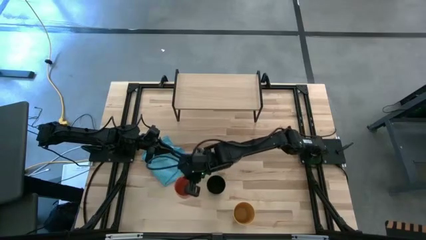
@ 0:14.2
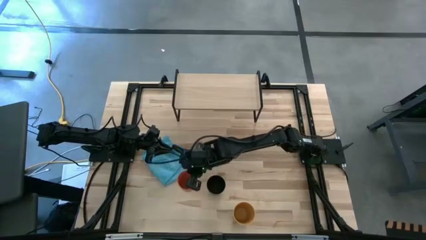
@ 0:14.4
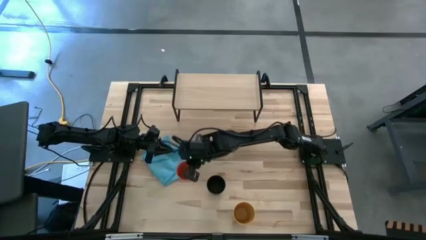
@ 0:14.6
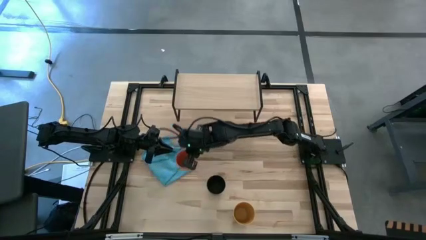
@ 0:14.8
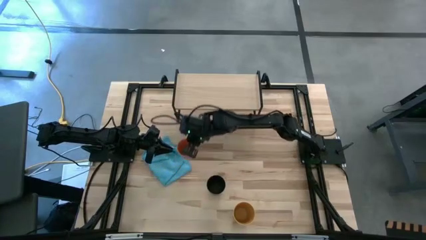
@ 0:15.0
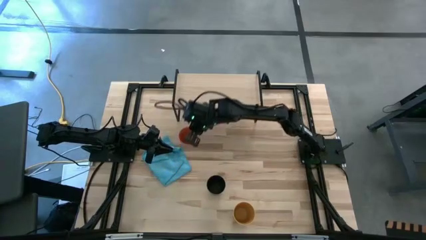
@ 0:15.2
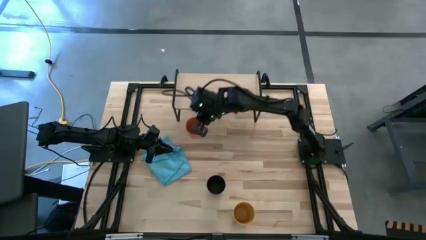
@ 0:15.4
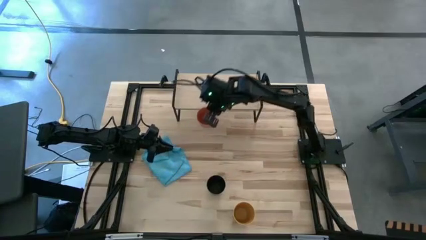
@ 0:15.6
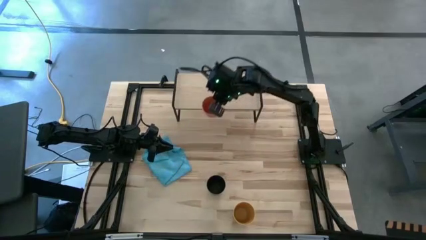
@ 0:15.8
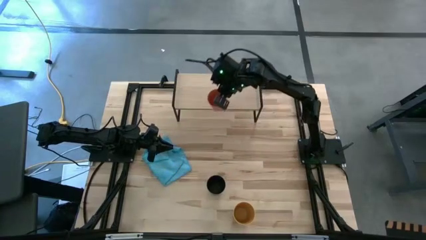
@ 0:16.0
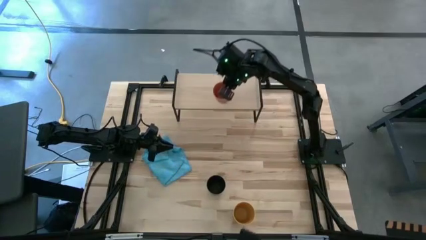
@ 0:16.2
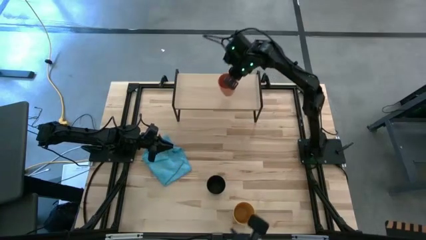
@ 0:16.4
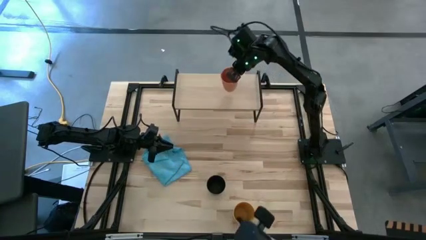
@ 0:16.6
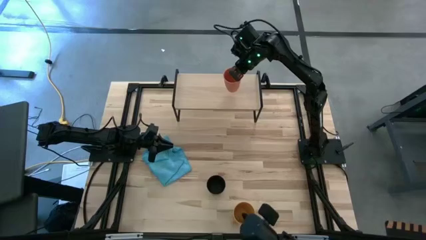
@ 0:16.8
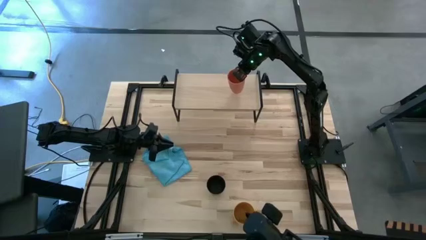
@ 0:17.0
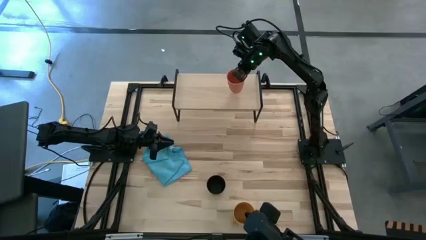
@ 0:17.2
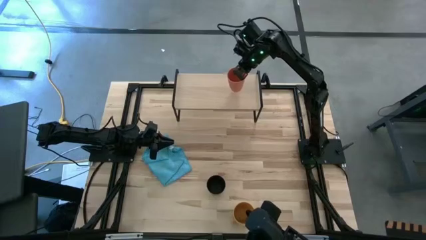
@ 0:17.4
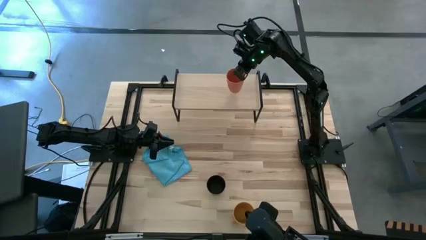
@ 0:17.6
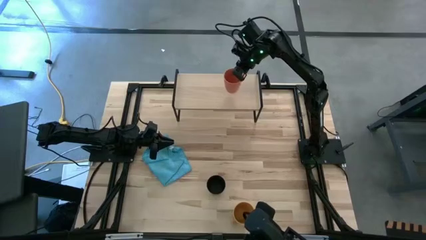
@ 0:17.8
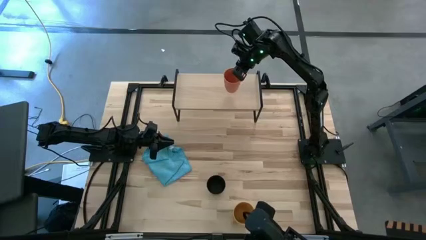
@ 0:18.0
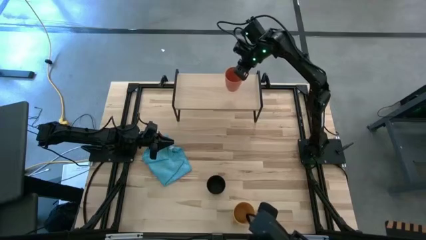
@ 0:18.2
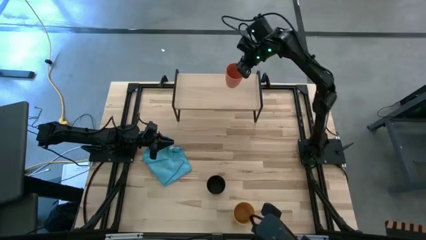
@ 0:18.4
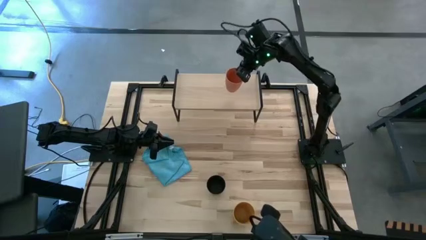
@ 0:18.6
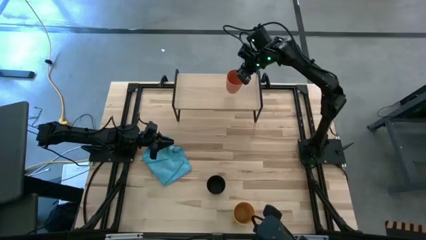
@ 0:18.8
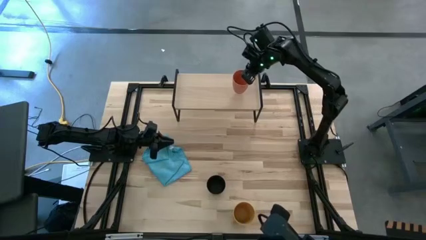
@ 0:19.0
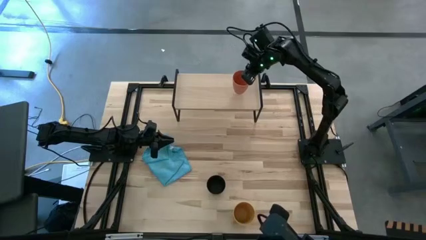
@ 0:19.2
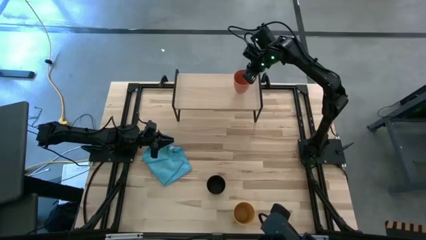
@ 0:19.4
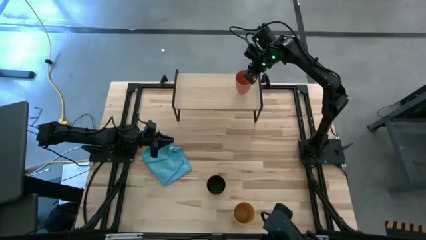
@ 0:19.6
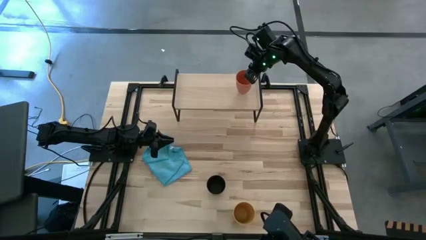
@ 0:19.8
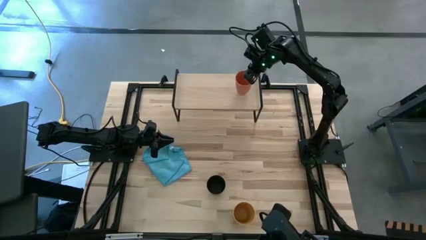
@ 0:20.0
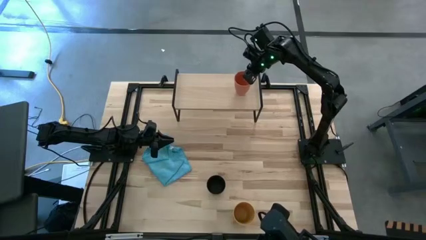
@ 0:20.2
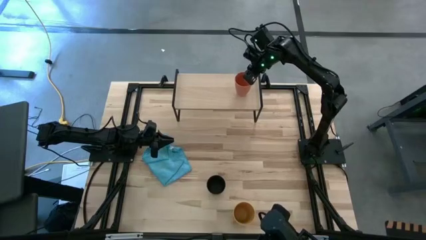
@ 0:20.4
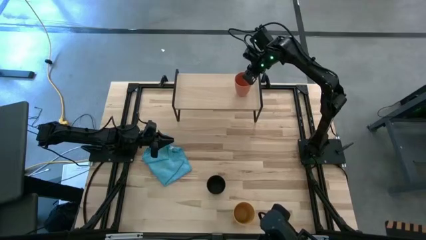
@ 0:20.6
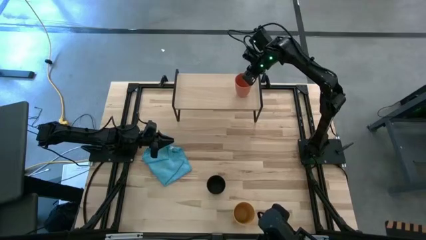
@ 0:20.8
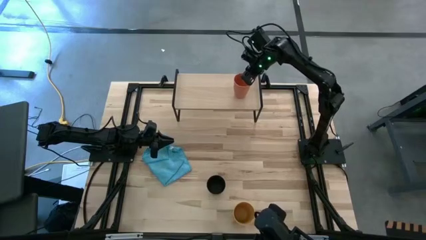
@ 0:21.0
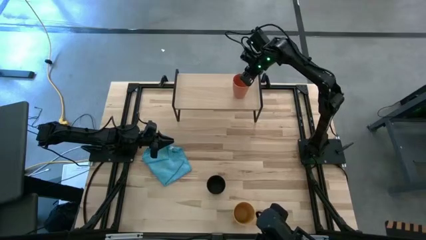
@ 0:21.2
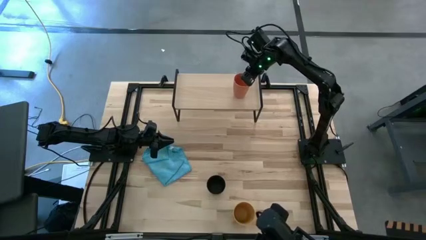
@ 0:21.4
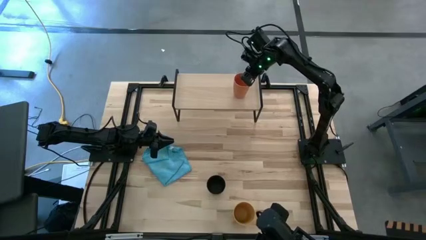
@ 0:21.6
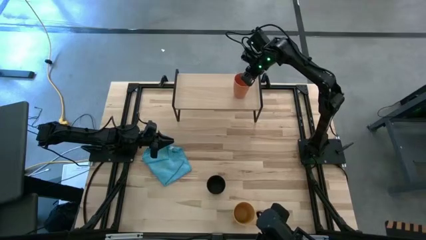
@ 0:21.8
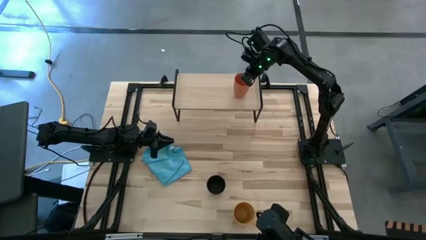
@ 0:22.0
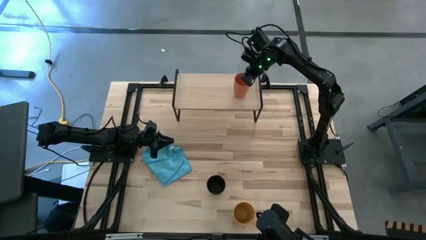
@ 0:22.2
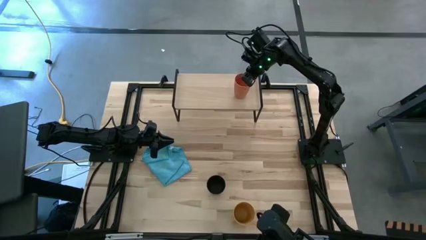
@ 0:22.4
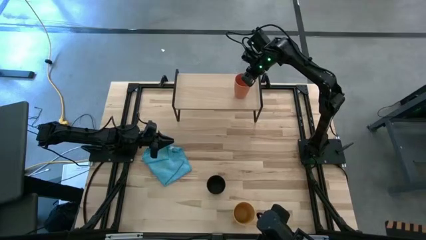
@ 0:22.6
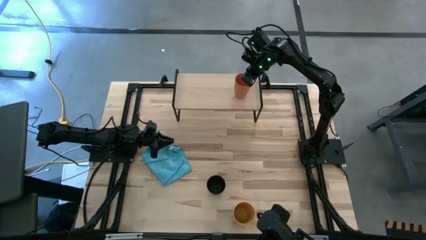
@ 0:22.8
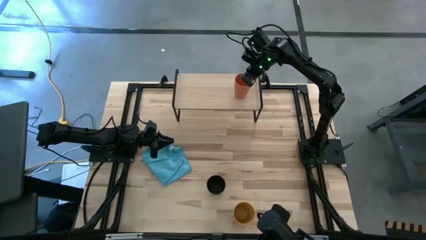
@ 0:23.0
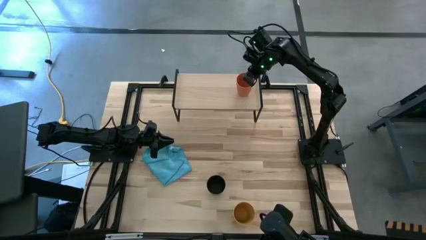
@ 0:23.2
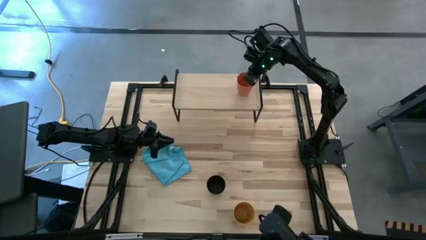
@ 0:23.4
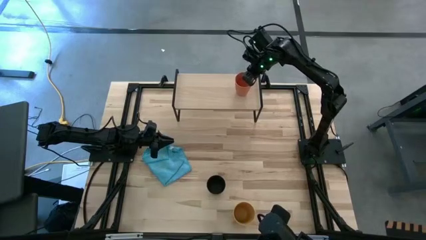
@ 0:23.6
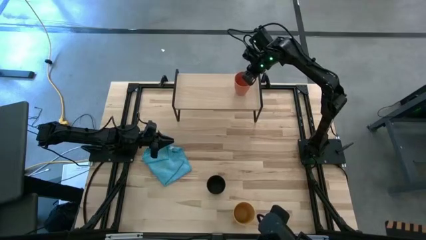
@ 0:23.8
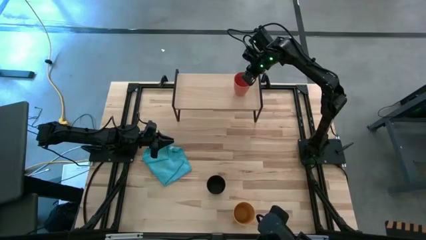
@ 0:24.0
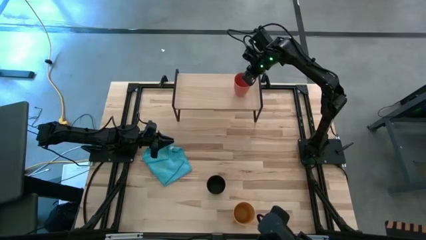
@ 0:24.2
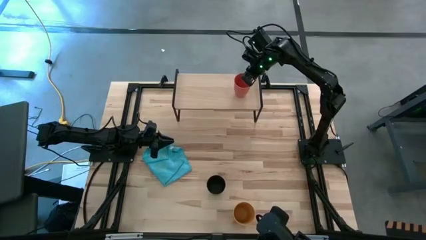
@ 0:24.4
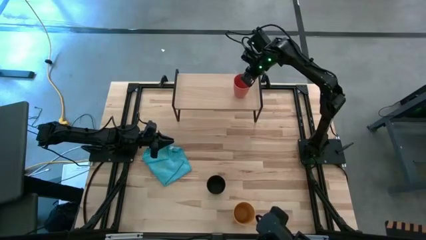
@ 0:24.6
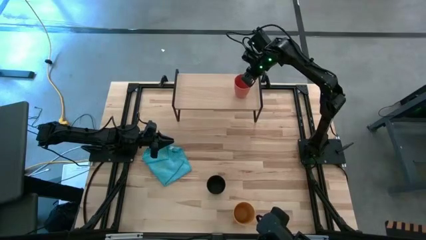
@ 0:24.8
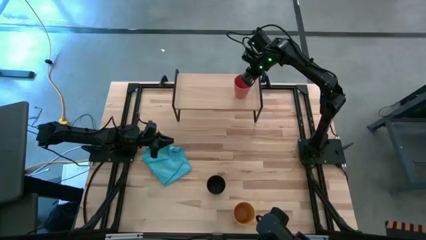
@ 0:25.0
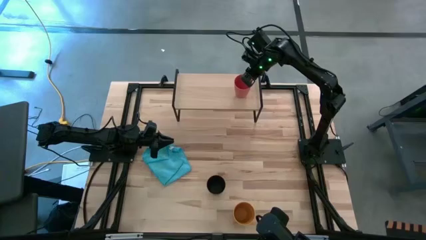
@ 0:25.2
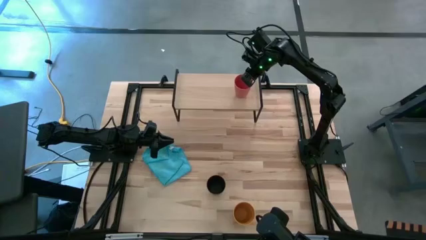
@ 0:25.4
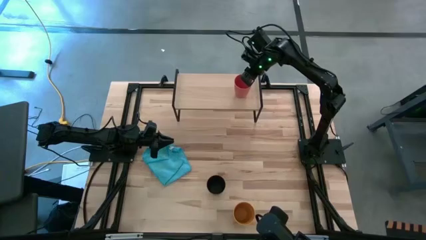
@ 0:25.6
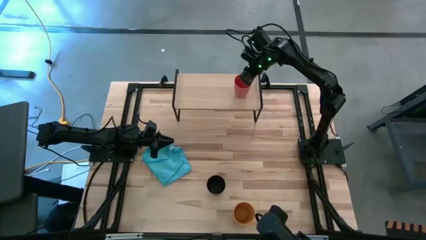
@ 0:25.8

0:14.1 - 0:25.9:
Task: Stack small to large cups/mugs on shelf
Put the orange cup on the shelf

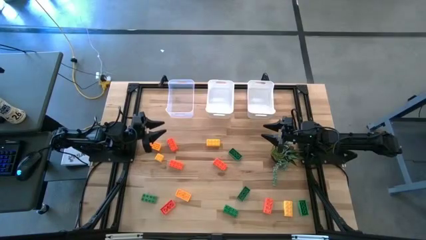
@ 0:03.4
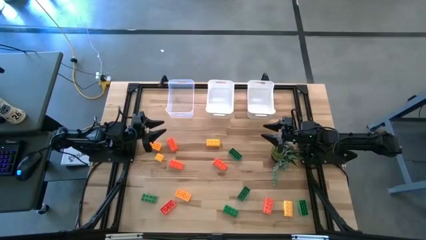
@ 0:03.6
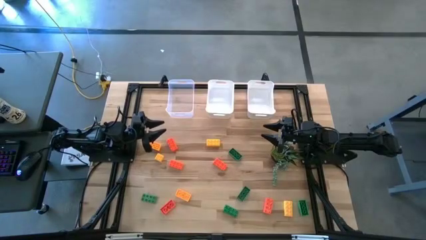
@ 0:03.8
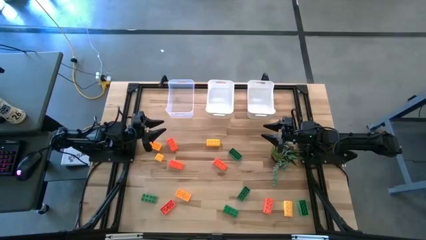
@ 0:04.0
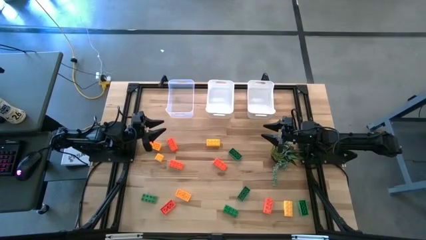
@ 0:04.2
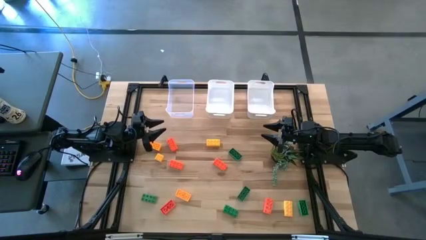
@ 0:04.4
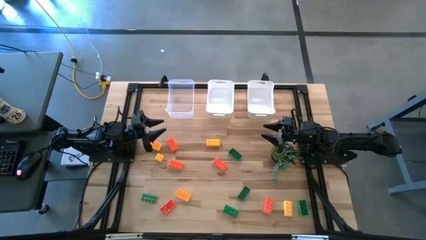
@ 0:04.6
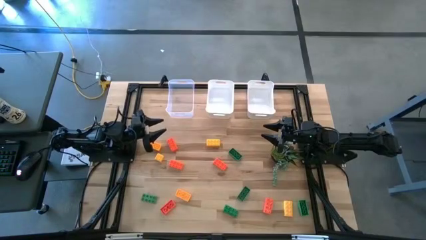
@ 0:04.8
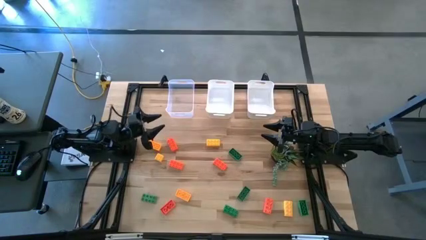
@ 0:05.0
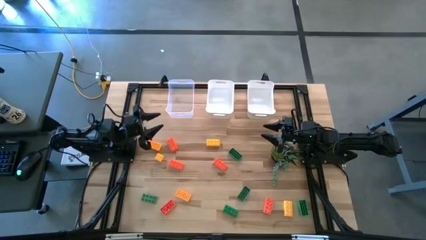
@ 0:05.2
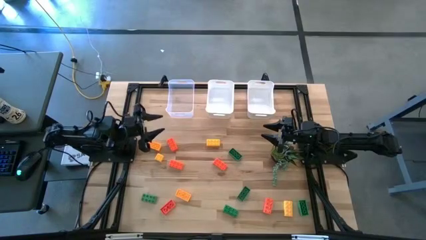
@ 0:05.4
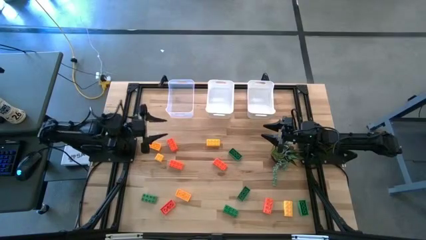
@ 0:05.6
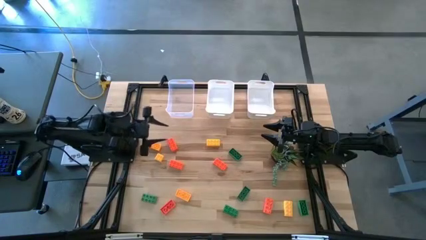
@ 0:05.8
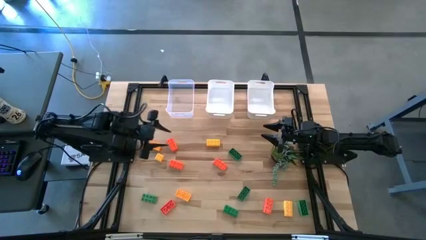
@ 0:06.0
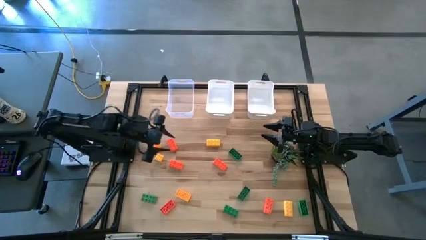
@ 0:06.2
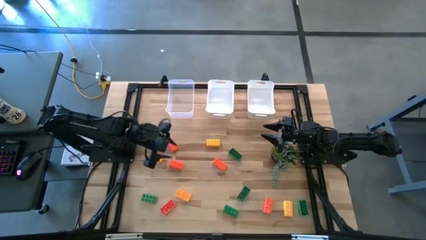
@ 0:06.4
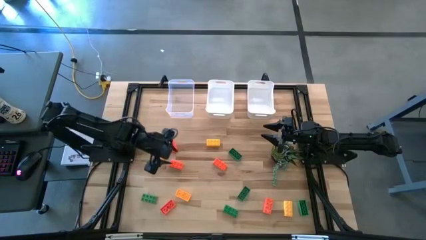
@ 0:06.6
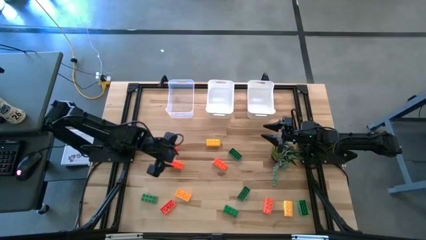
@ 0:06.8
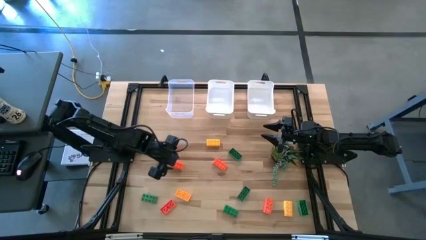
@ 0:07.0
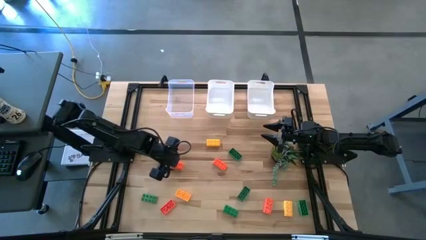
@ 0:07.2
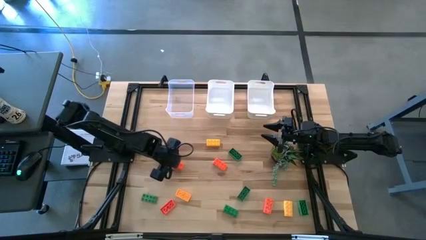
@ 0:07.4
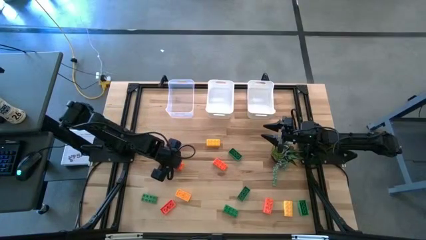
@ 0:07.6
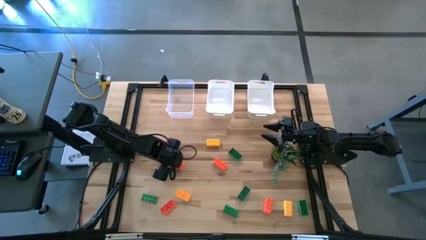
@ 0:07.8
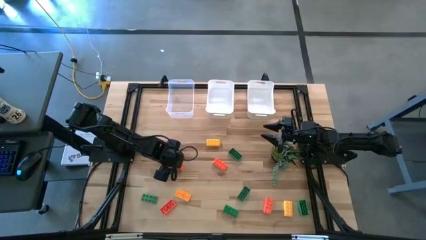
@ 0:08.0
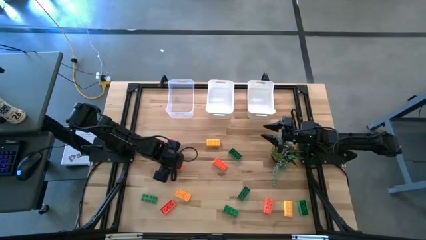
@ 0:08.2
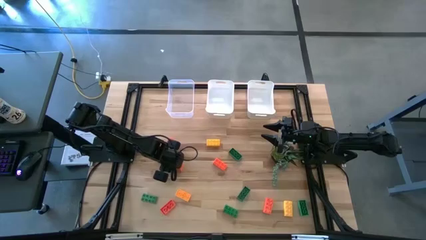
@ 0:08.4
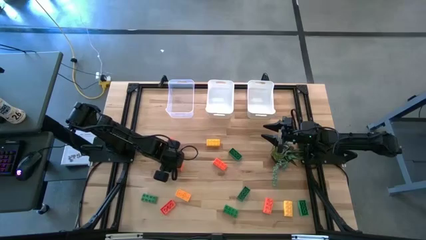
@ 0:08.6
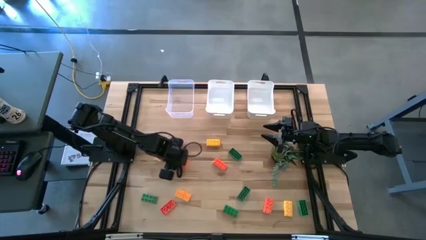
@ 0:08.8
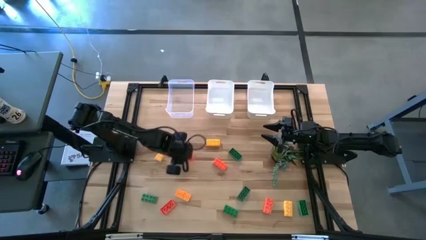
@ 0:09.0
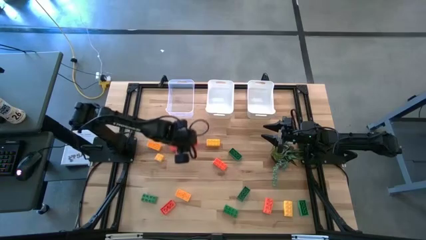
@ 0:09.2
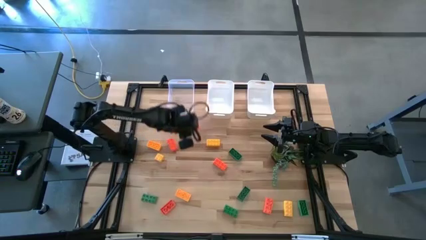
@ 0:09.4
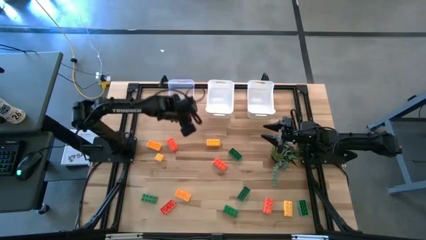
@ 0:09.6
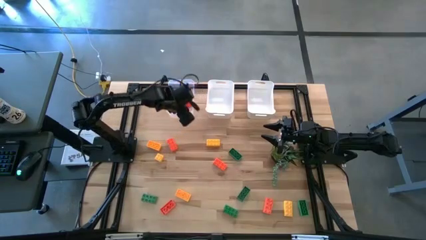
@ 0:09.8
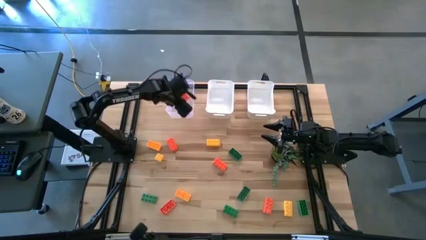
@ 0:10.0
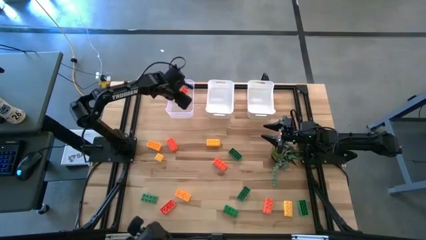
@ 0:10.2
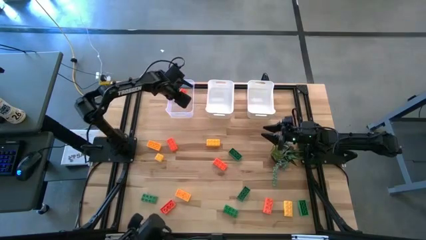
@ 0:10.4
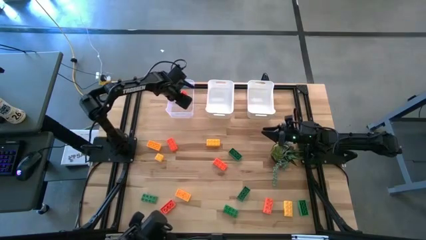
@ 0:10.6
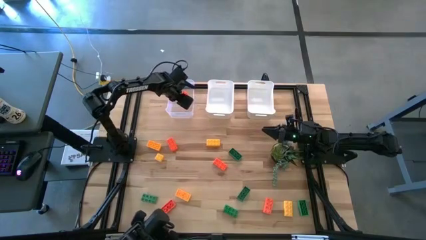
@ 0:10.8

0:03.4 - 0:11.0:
Task: Sort & place blocks by color
Put the orange game piece into the transparent bin
